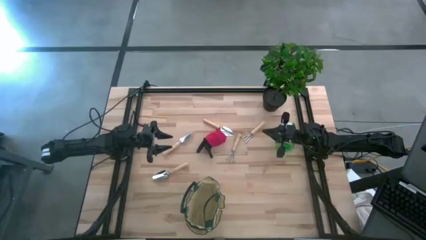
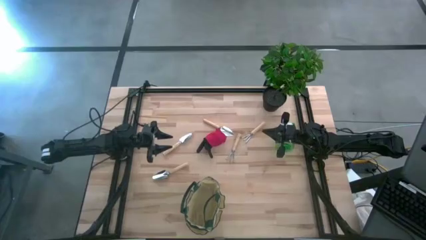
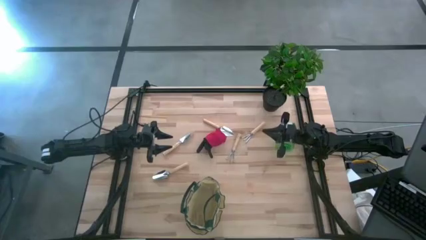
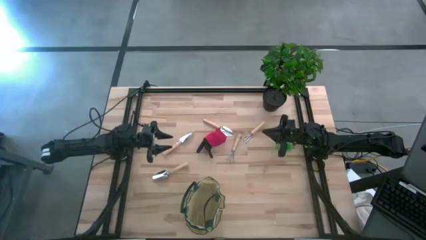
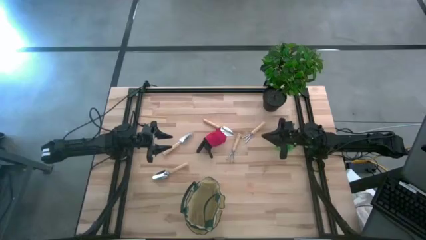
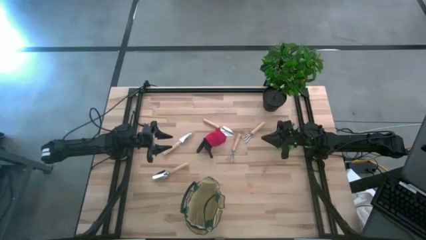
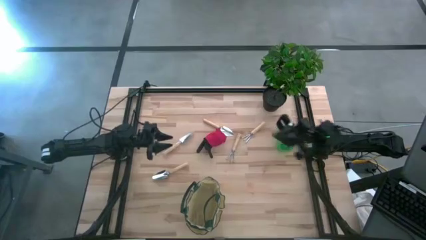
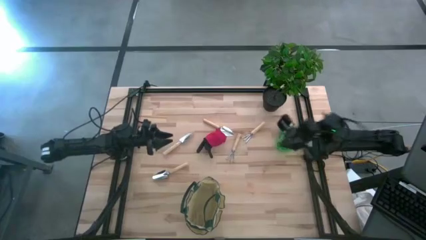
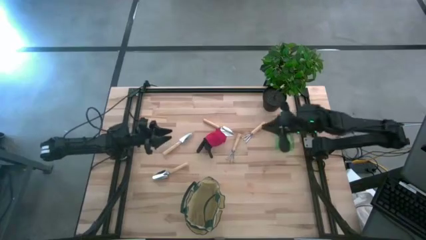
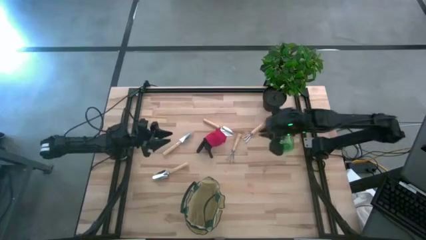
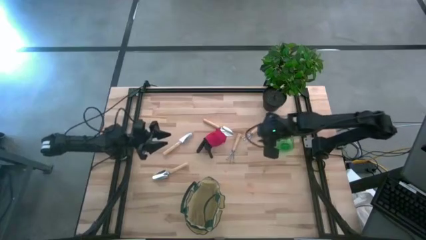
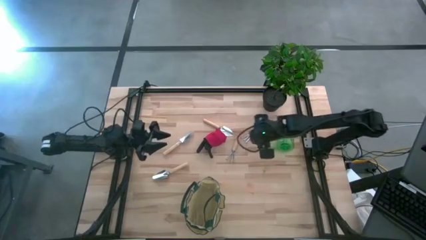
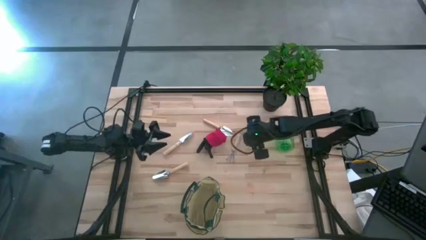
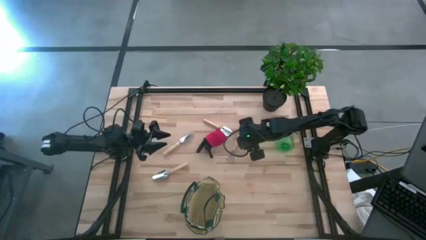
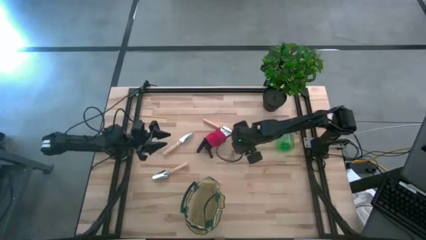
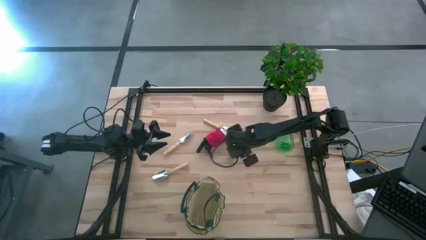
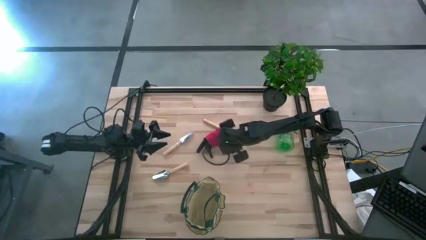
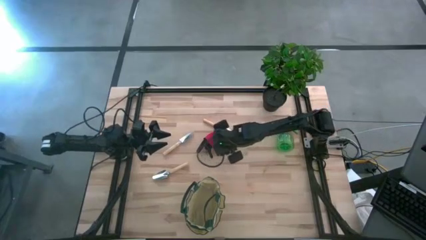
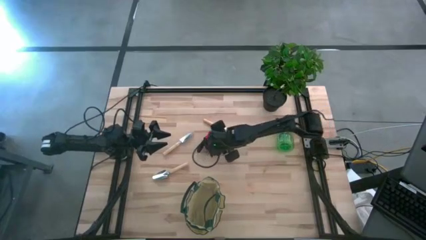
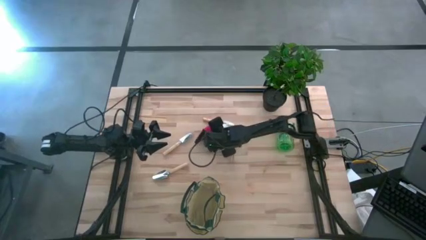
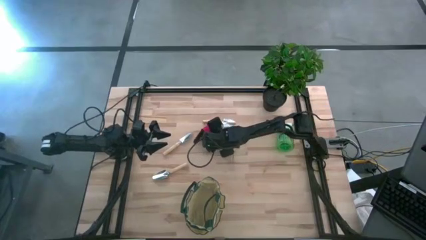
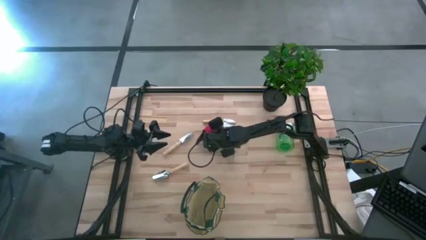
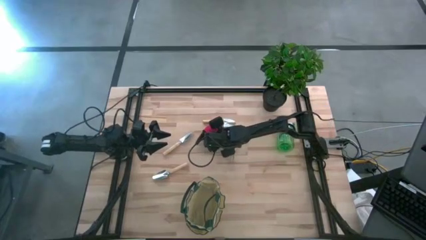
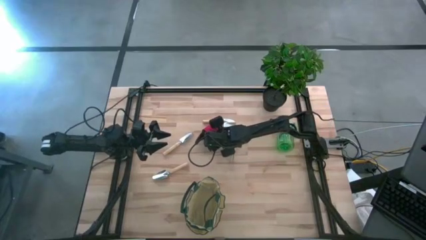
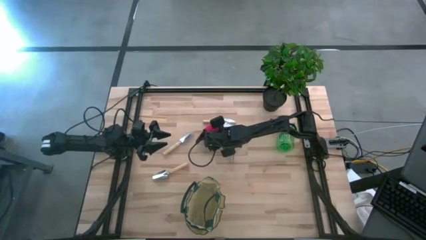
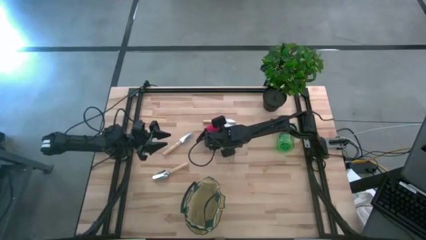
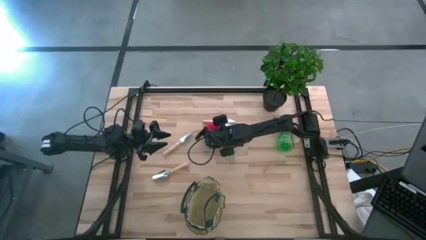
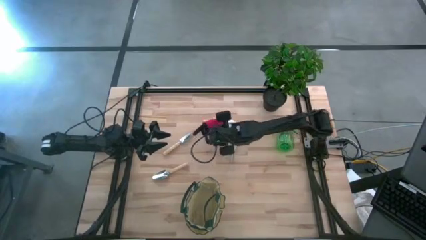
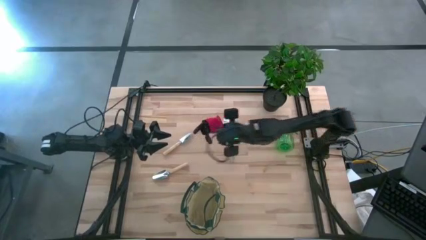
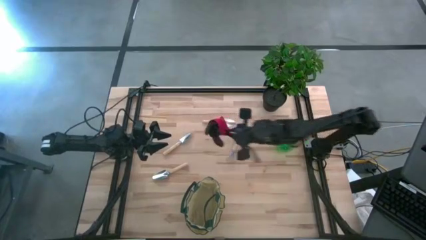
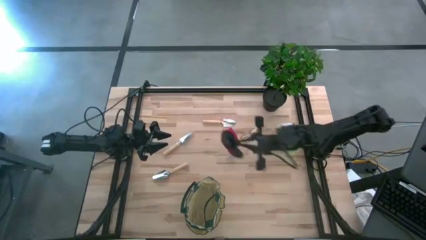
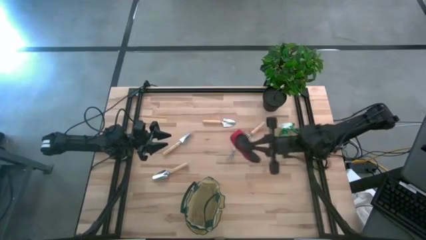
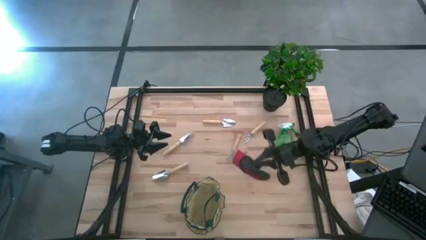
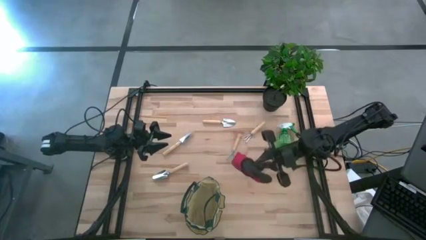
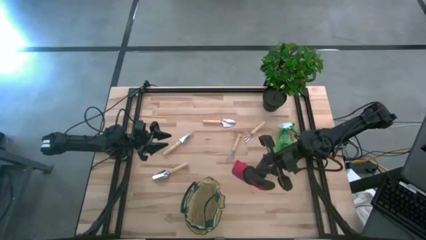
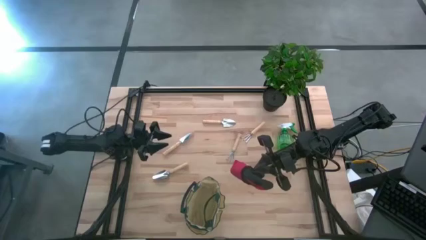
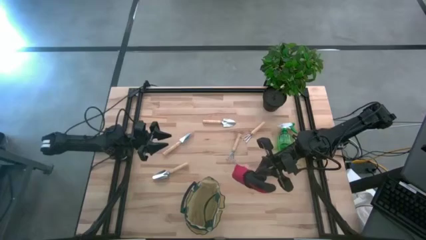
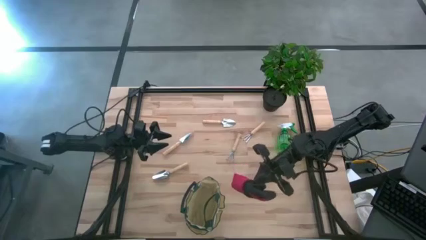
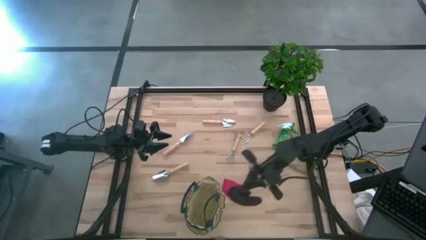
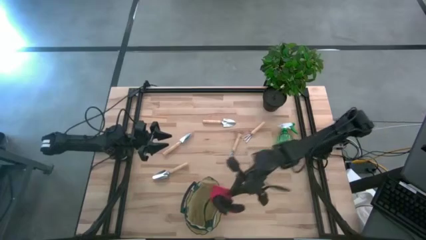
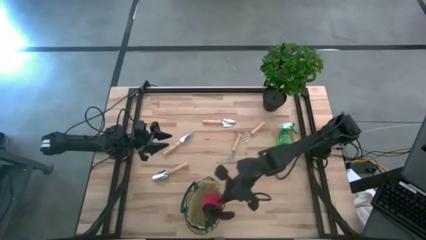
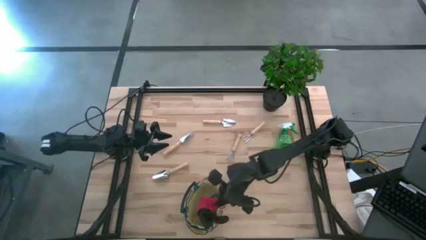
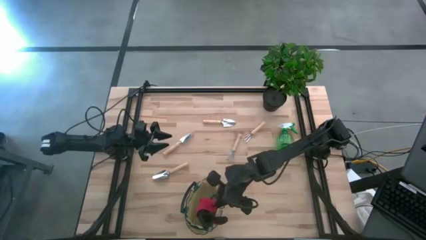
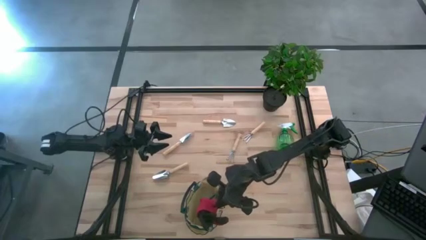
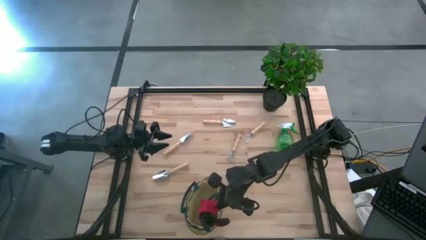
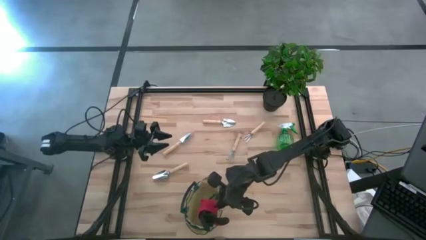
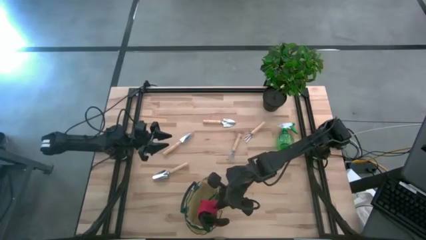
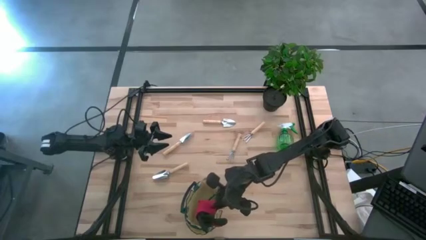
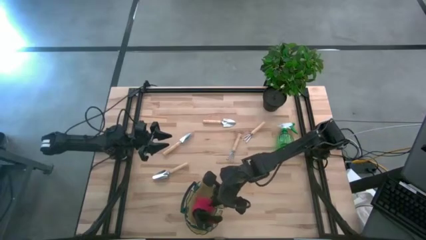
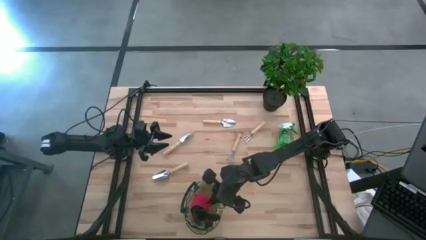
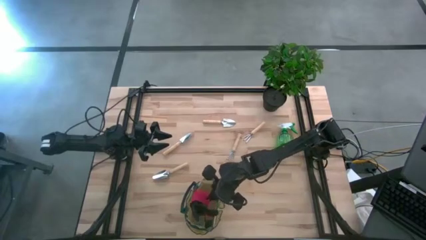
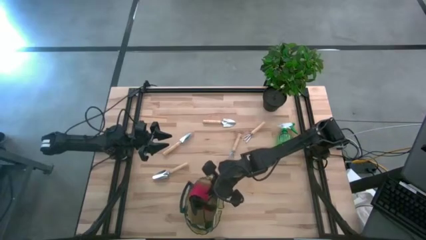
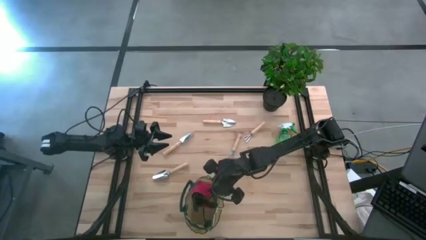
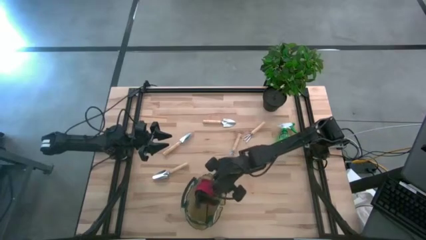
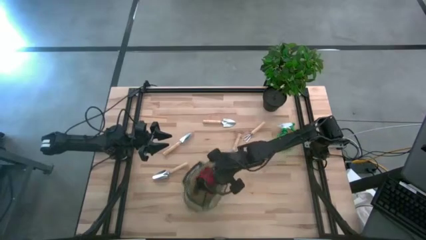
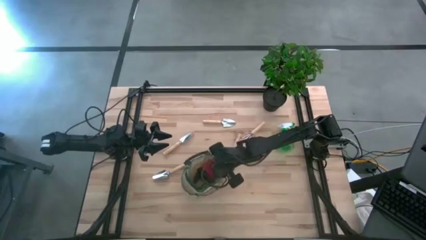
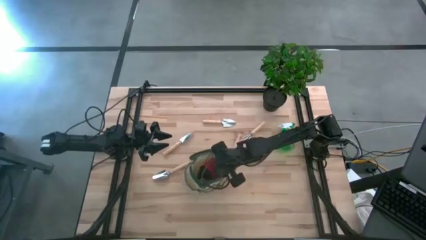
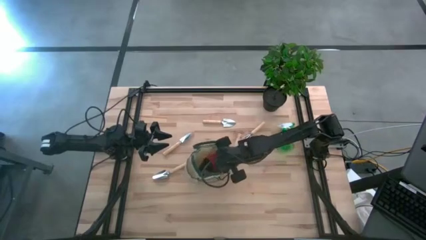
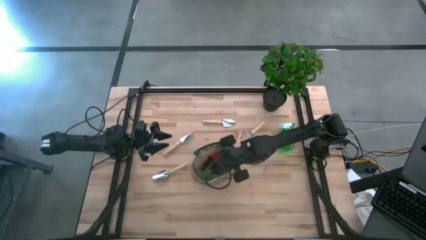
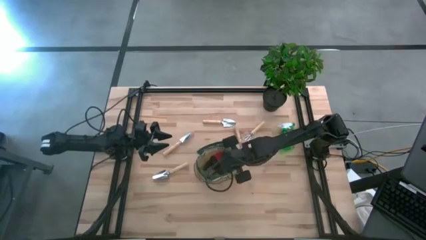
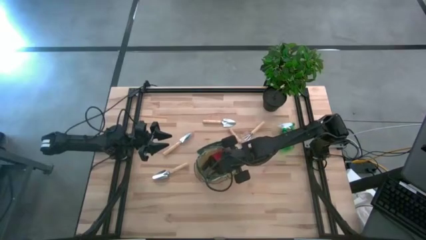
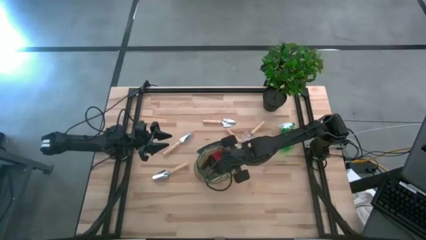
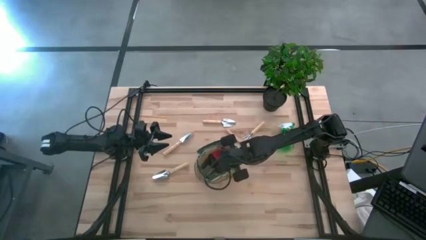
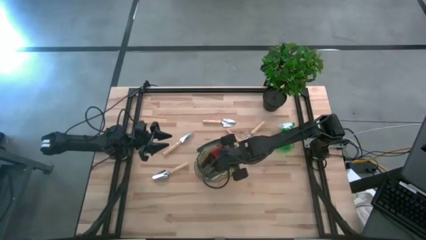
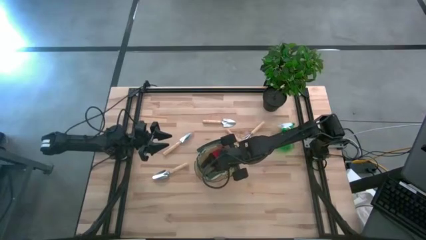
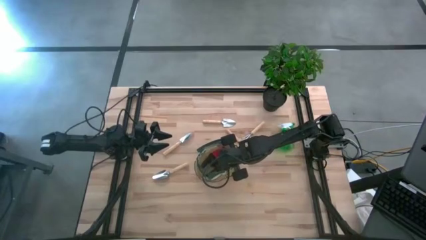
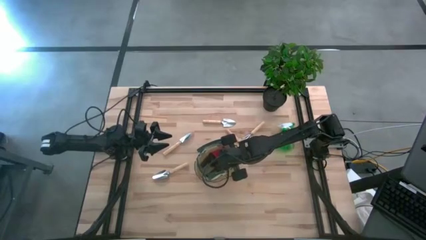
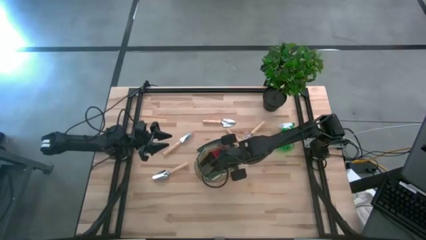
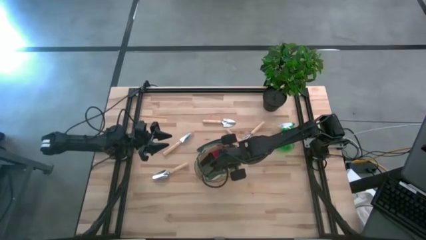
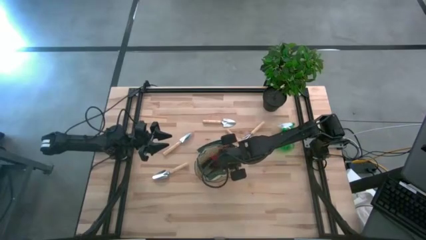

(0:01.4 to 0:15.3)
Task: Pick & Place Garden tools in Gardening bag
Put the red gloves into the green gardening bag
